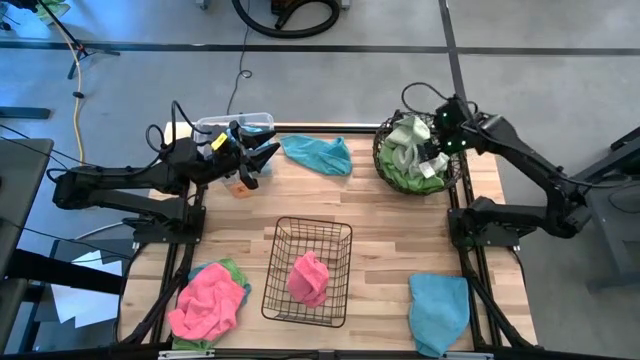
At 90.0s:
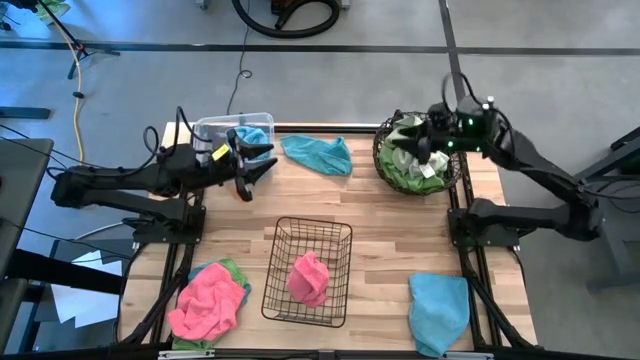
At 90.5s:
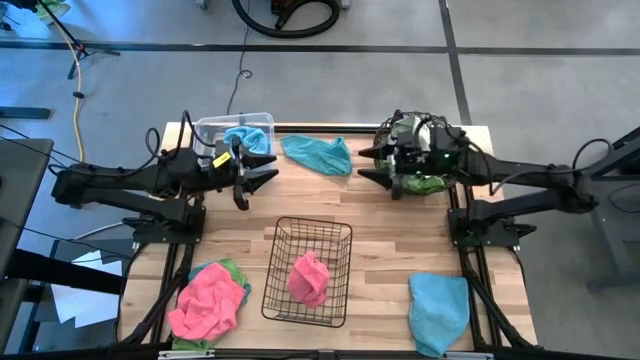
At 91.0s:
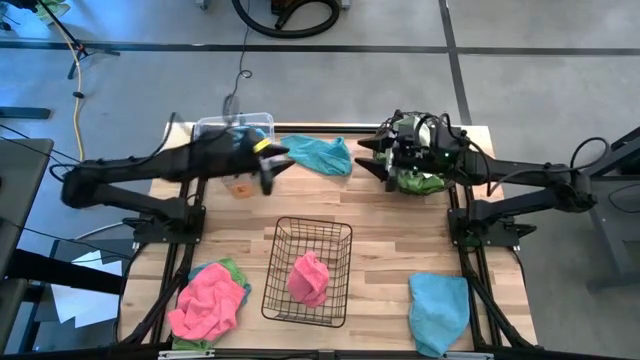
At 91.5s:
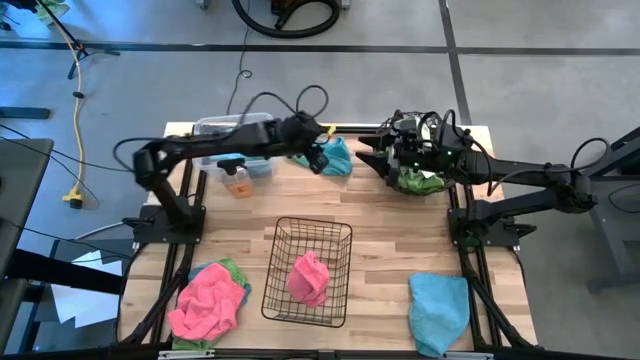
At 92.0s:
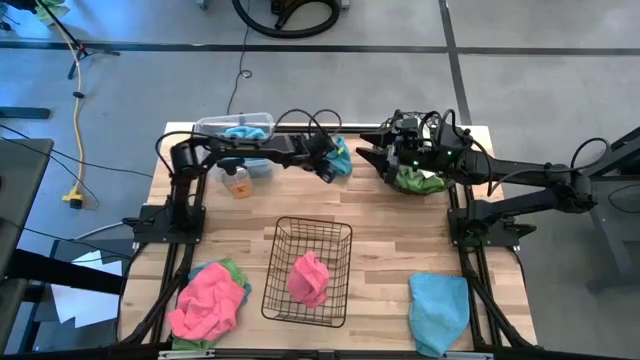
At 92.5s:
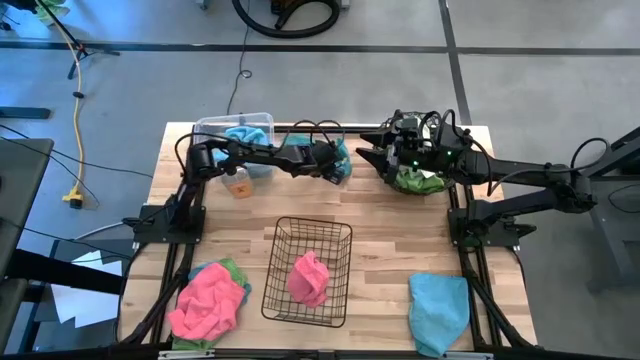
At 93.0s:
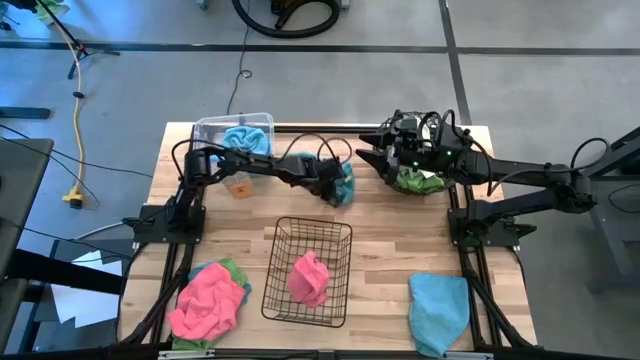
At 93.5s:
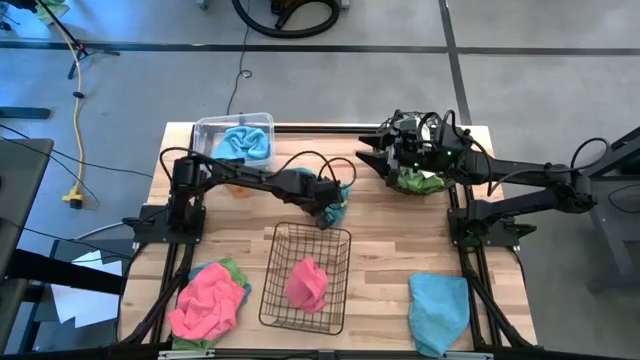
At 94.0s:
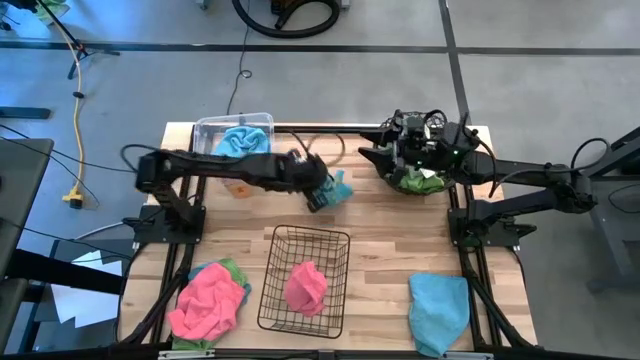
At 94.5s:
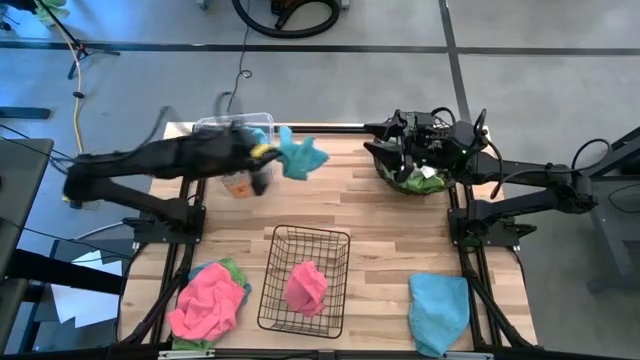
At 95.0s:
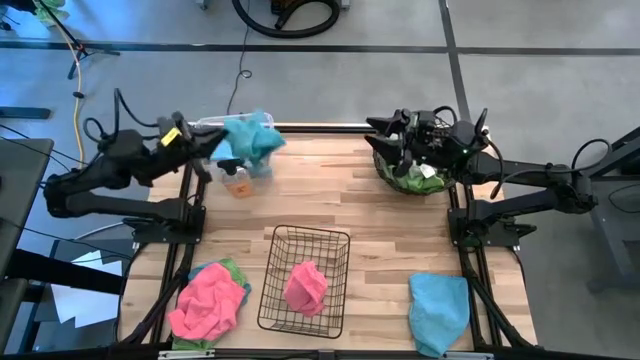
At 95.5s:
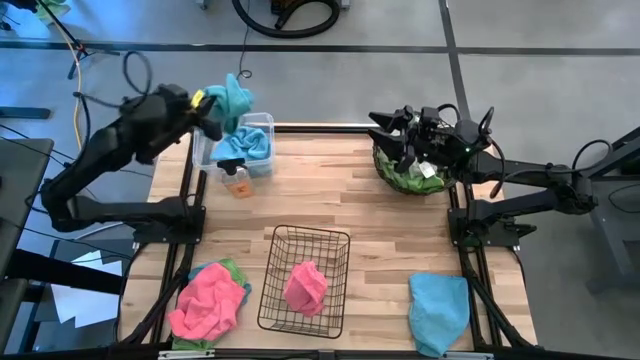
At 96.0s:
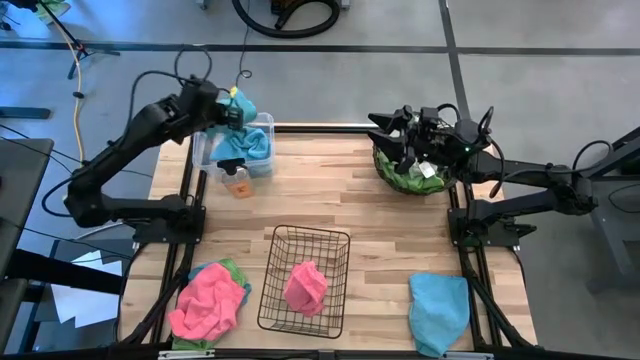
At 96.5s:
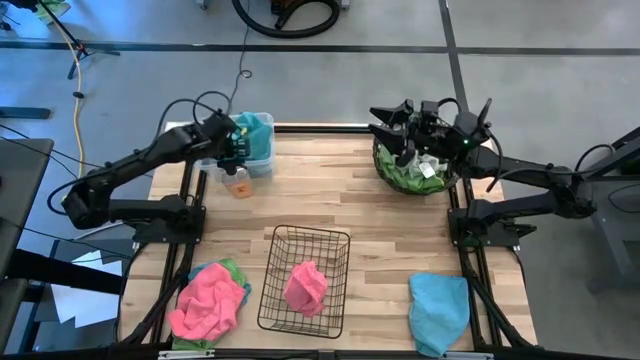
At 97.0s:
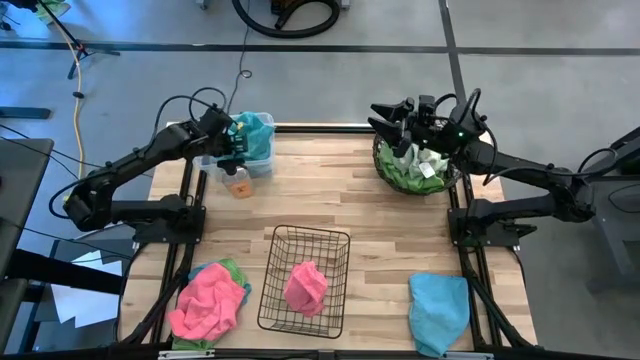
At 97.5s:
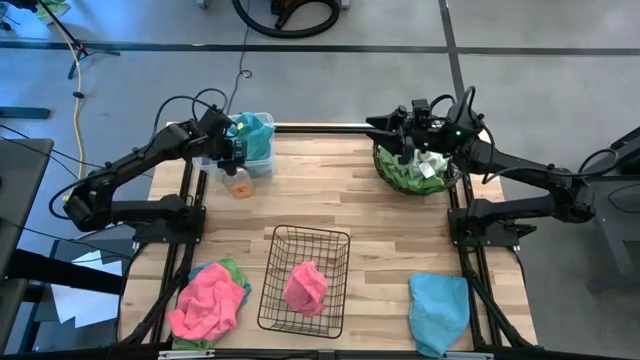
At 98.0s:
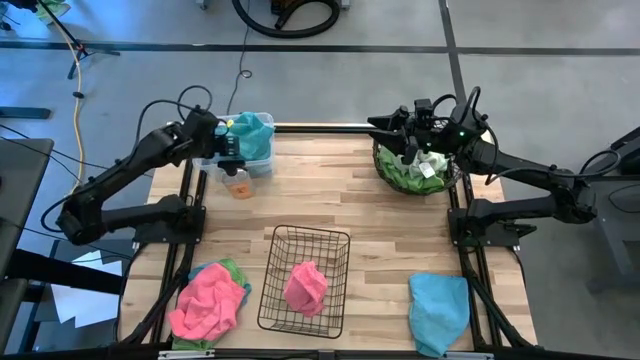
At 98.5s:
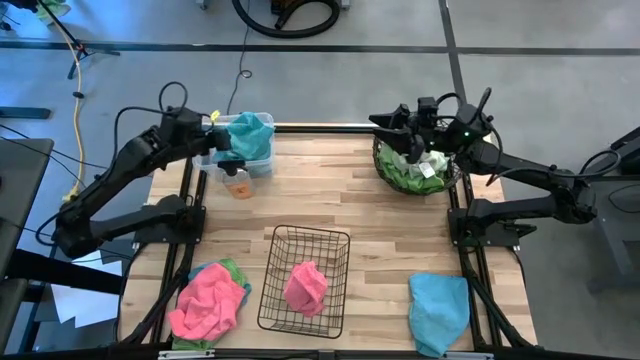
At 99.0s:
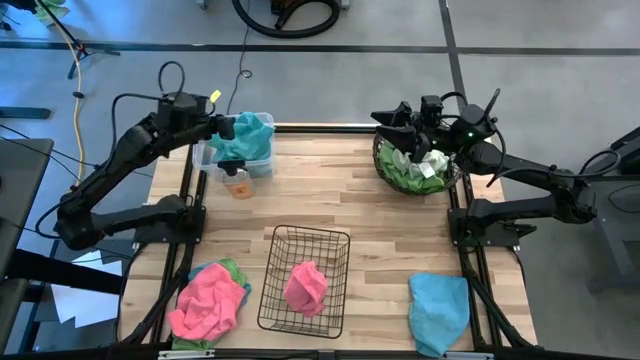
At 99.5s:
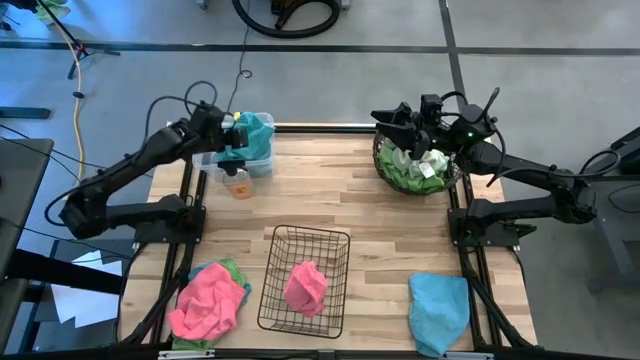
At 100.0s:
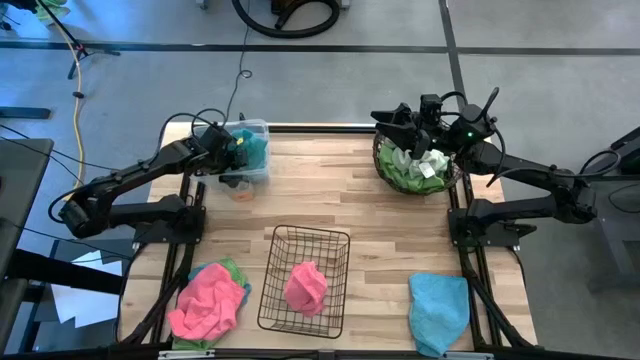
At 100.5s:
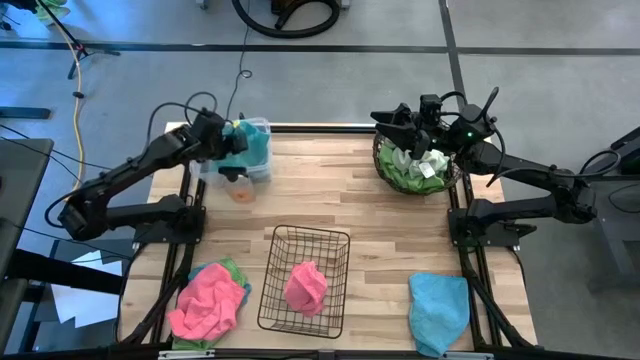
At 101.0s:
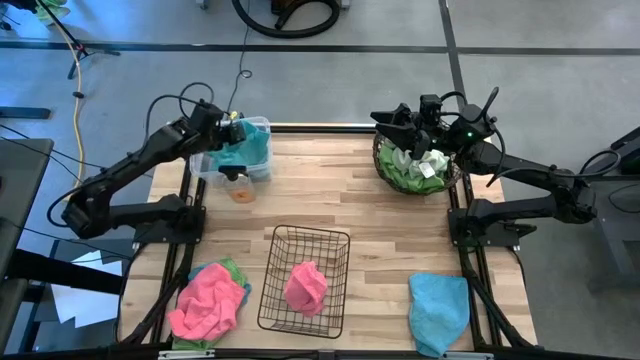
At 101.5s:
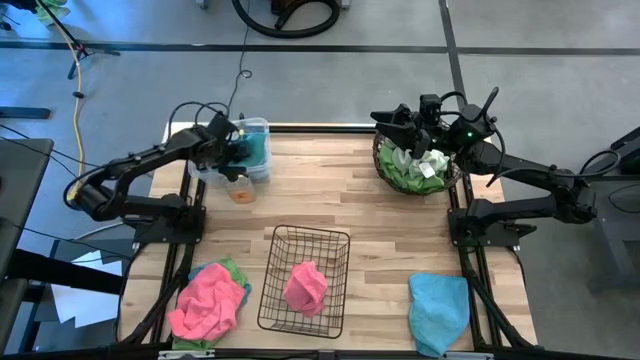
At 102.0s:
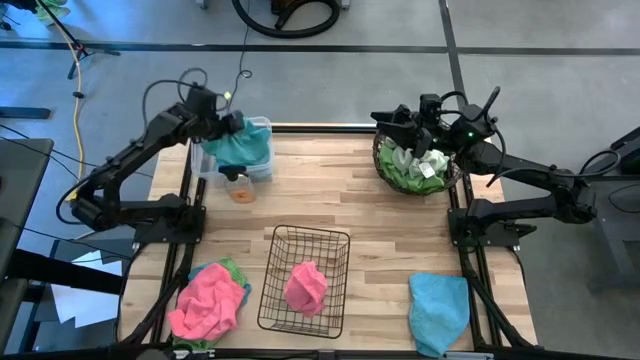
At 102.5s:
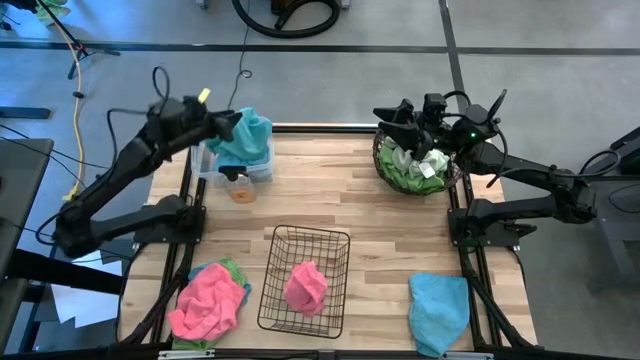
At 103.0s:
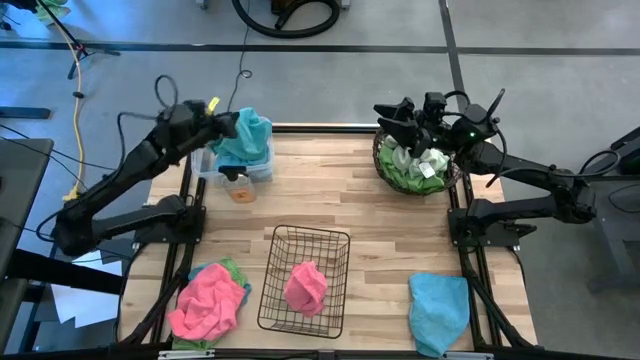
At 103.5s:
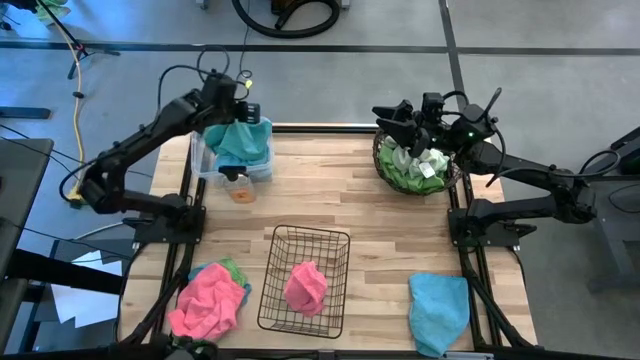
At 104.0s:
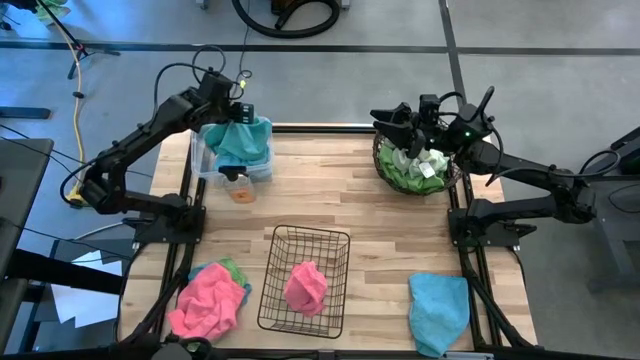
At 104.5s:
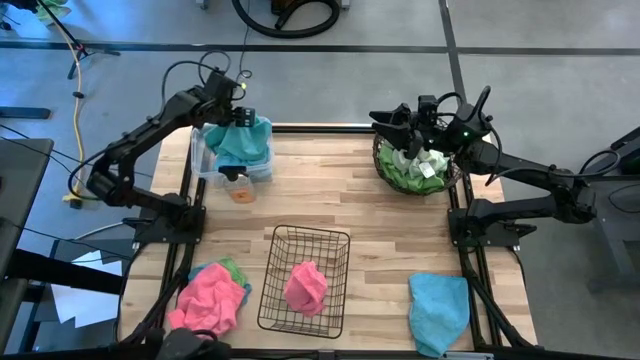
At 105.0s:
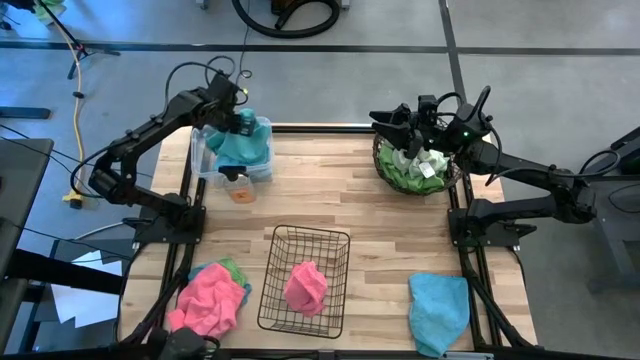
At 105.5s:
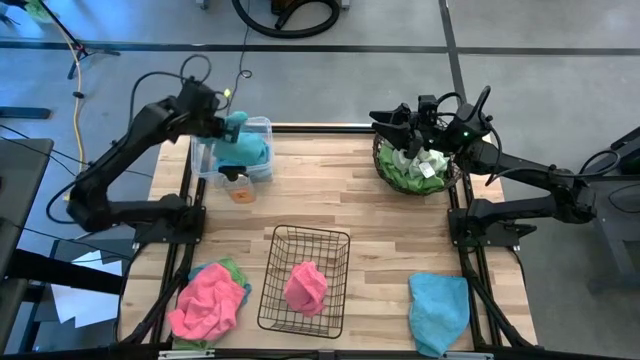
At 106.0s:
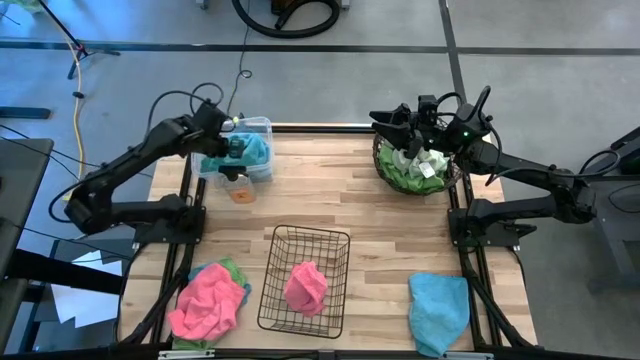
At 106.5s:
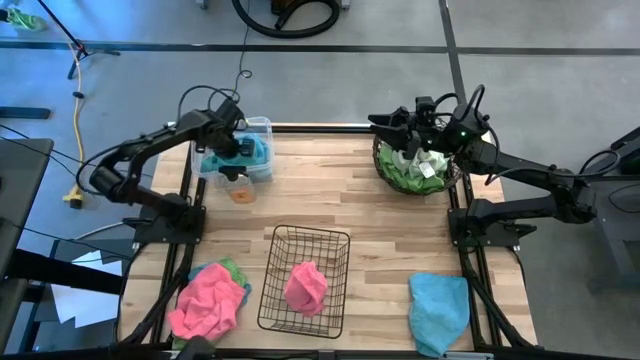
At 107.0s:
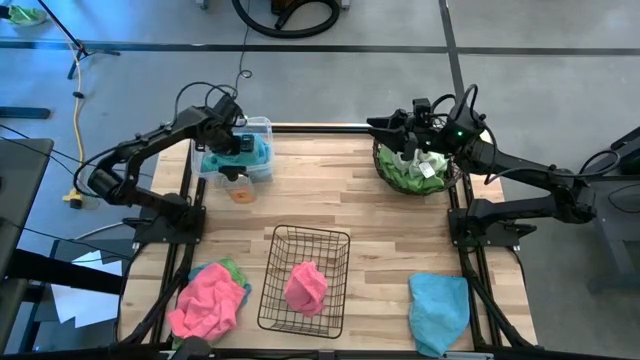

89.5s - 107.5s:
Task: Sort microfiber towel by color & place in baskets
Put the blue microfiber towel into the transparent bin

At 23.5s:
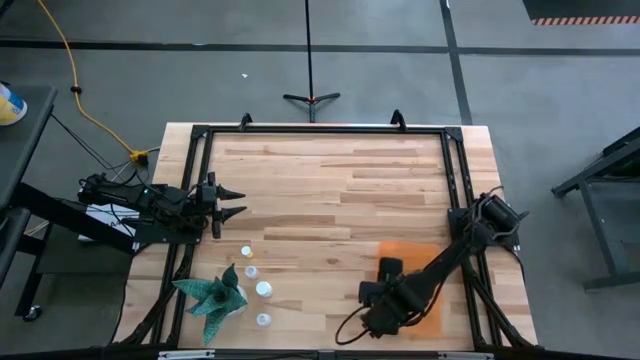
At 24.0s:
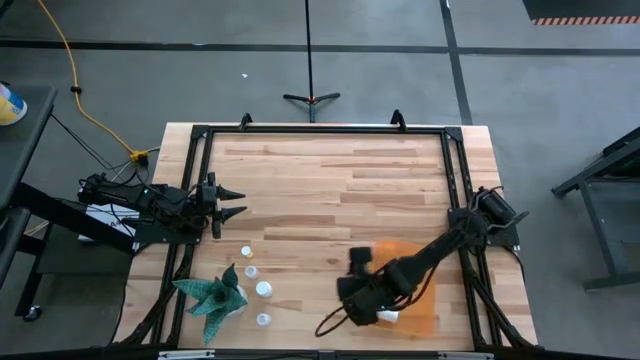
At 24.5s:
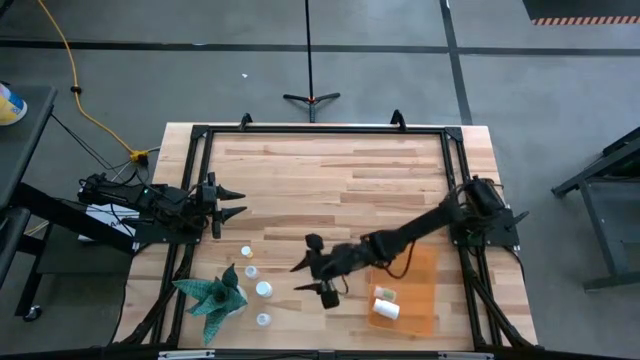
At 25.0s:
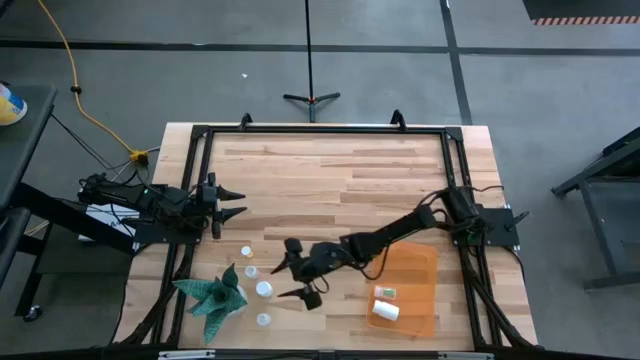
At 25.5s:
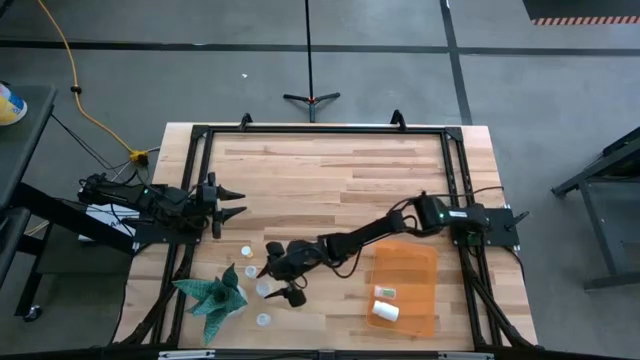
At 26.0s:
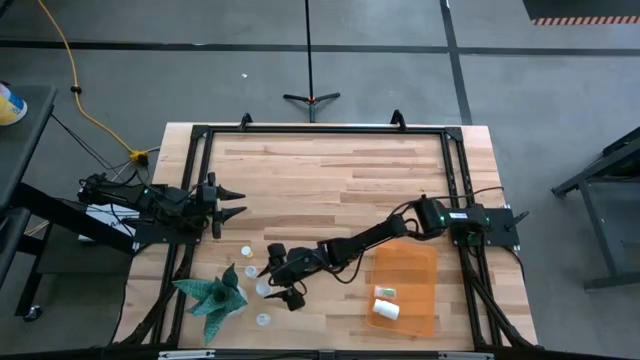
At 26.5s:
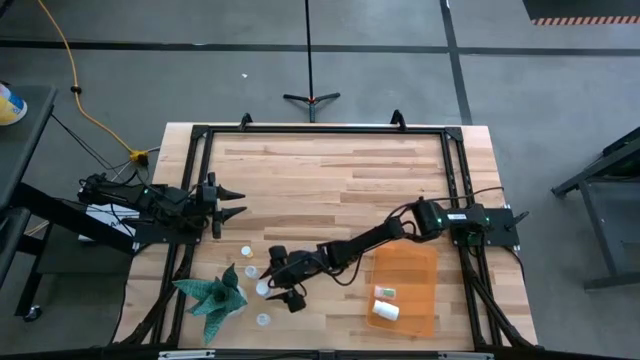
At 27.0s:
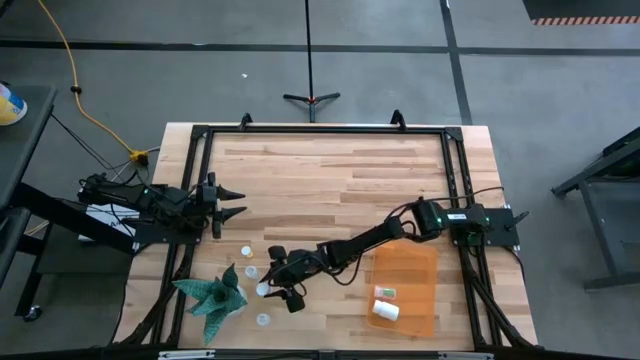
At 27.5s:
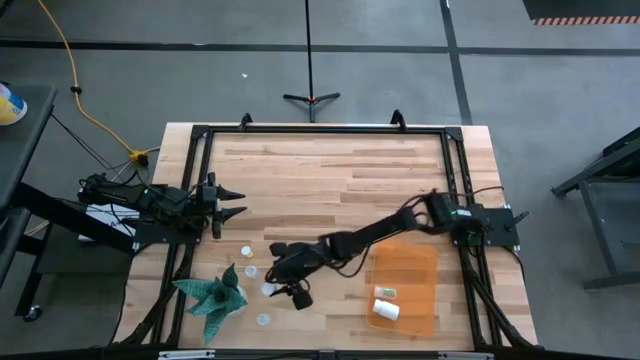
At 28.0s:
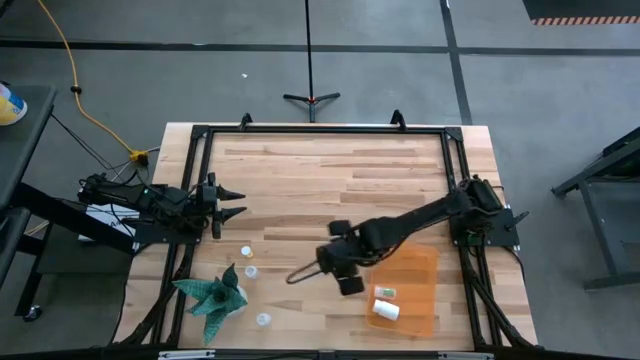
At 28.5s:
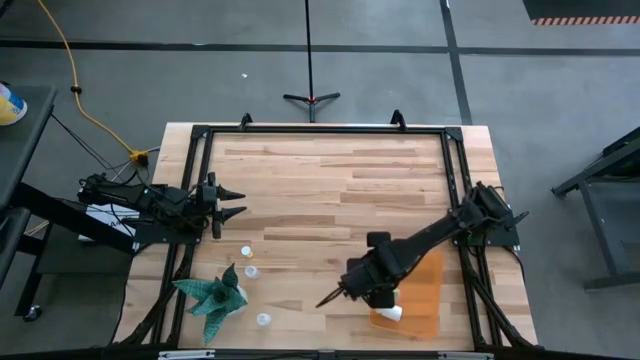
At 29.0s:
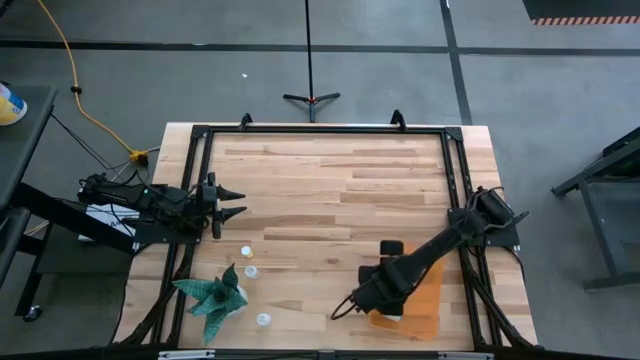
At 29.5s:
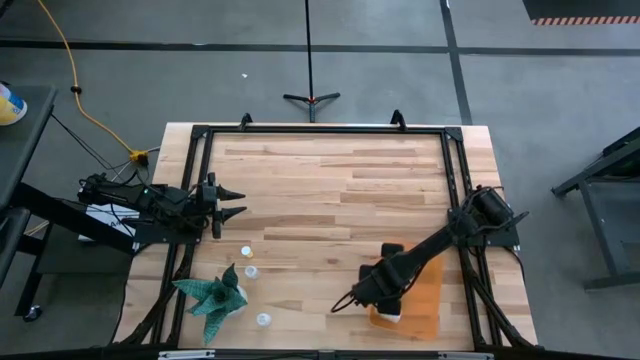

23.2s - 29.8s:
Task: Pick and place pill bottles into a basket
Put the white medicine bottle into the orange bin
